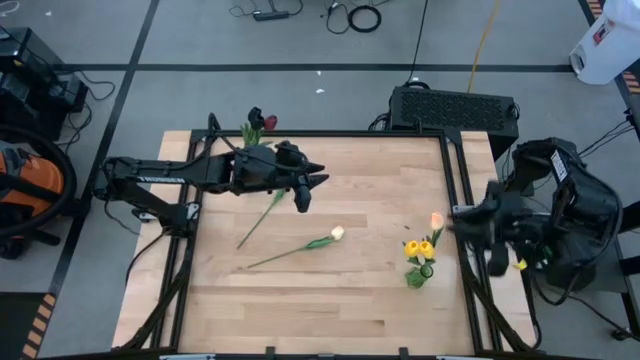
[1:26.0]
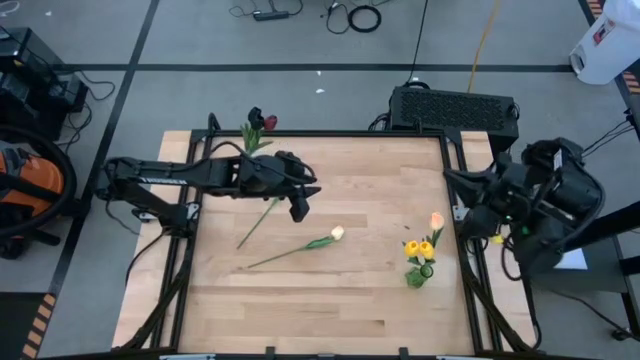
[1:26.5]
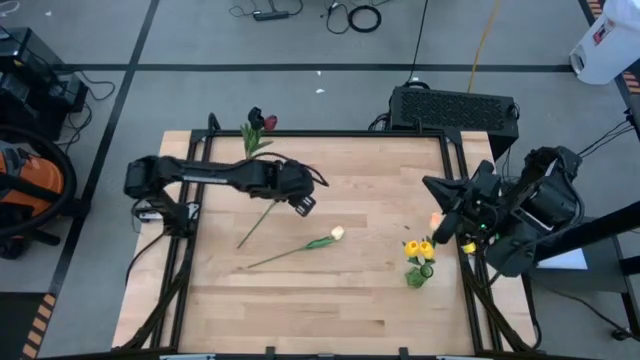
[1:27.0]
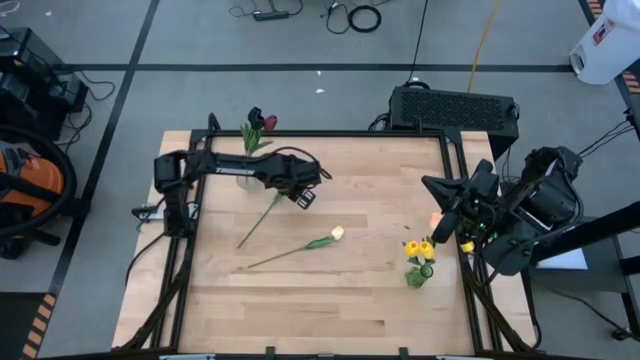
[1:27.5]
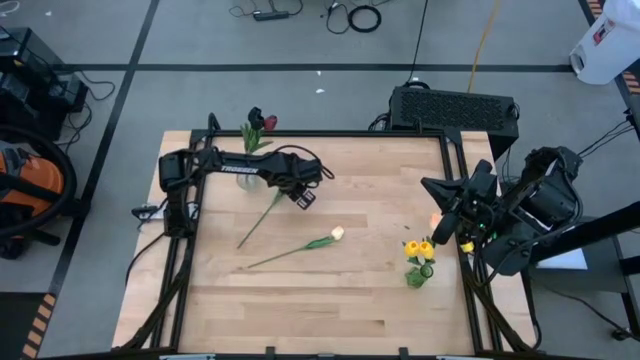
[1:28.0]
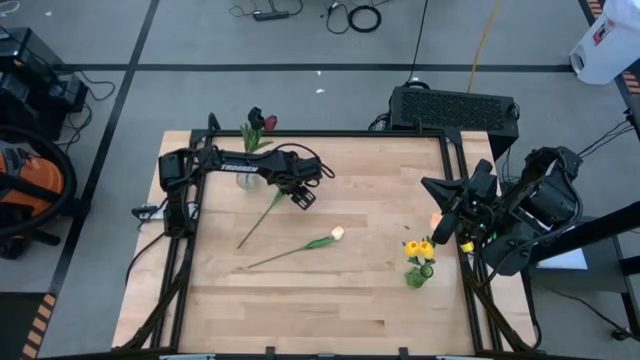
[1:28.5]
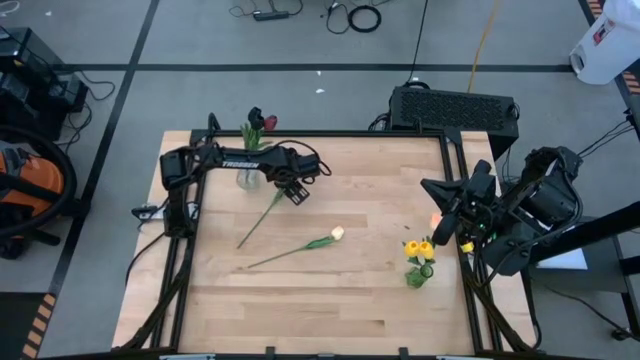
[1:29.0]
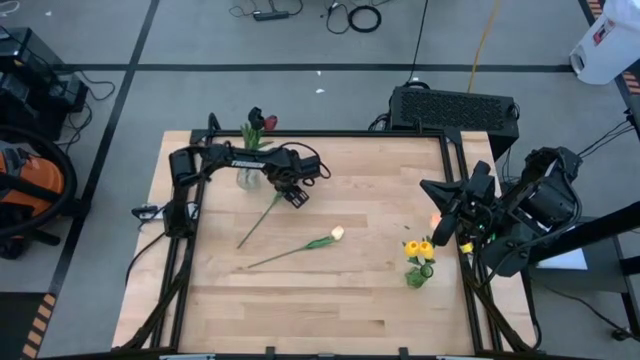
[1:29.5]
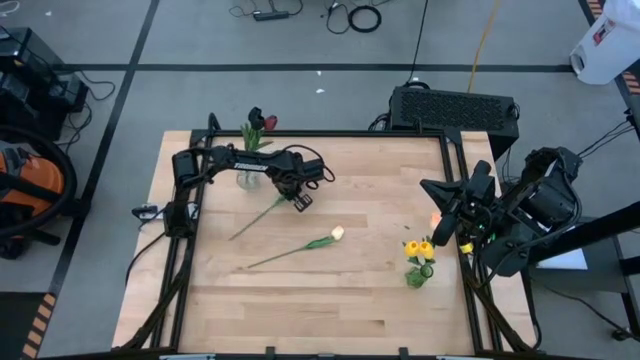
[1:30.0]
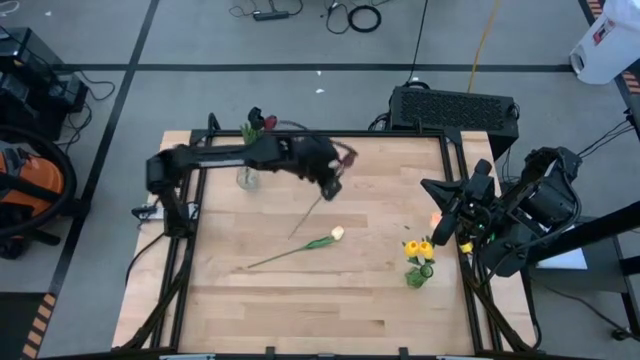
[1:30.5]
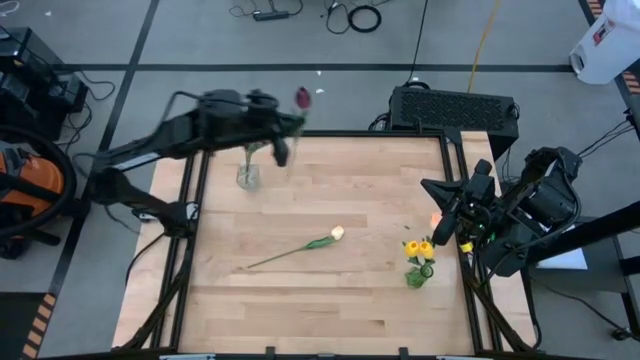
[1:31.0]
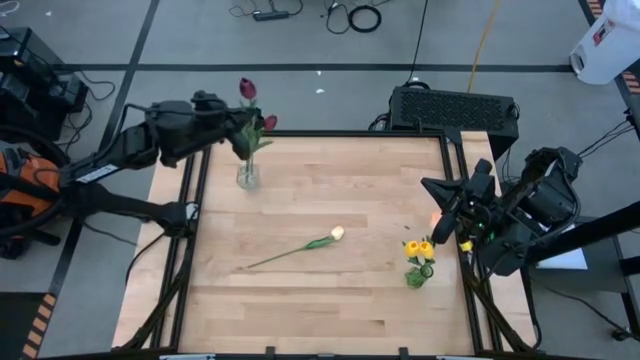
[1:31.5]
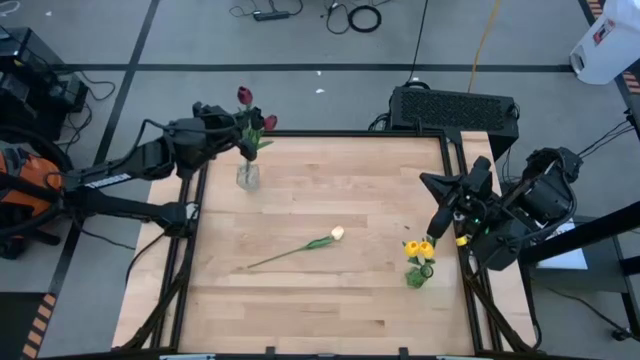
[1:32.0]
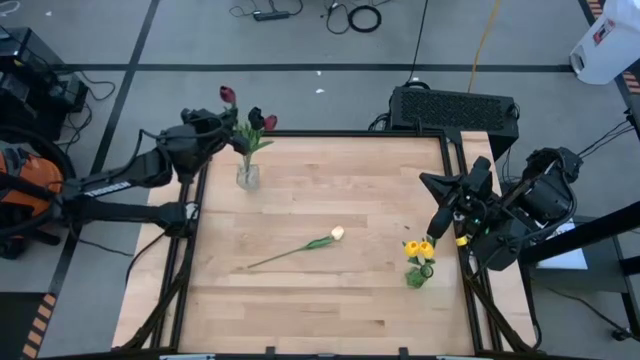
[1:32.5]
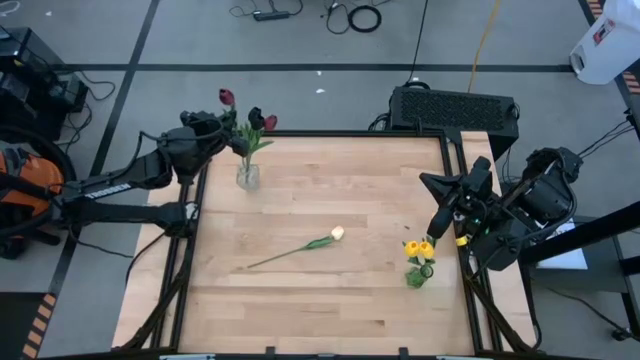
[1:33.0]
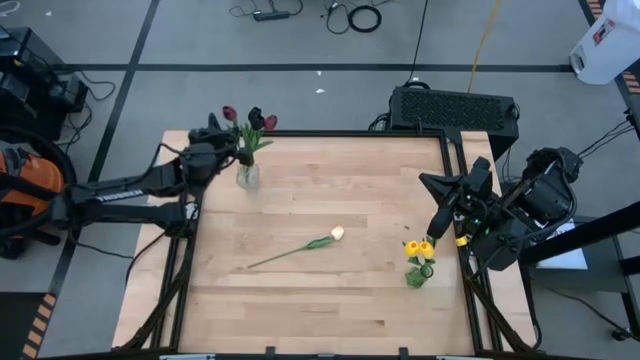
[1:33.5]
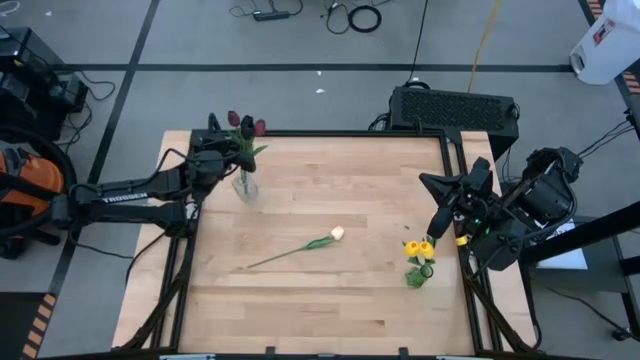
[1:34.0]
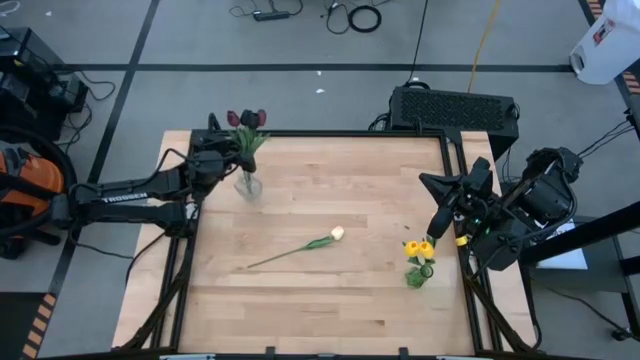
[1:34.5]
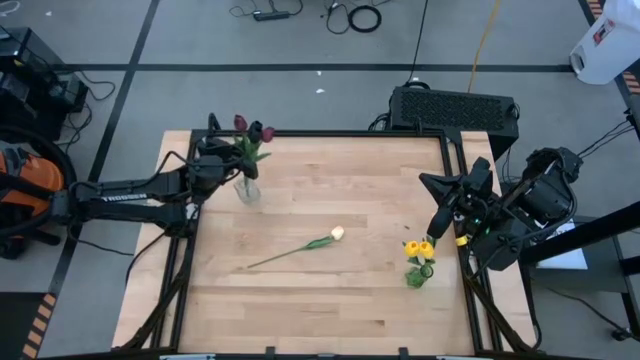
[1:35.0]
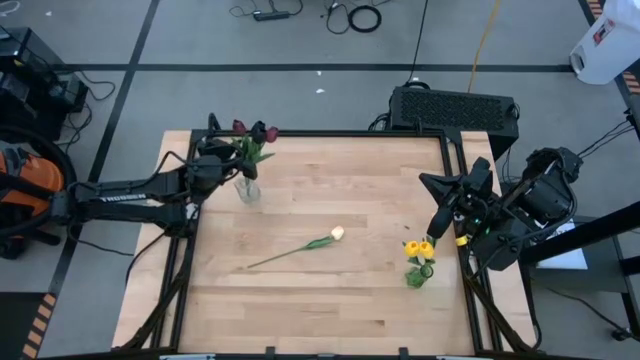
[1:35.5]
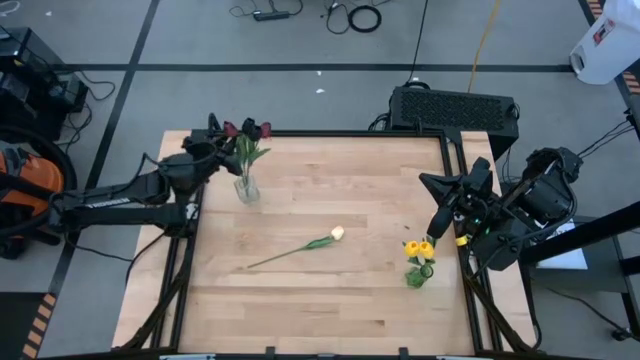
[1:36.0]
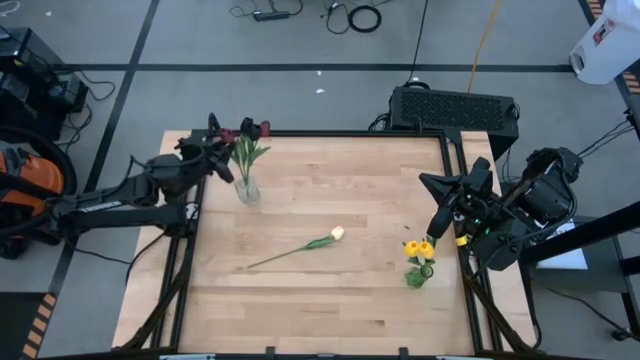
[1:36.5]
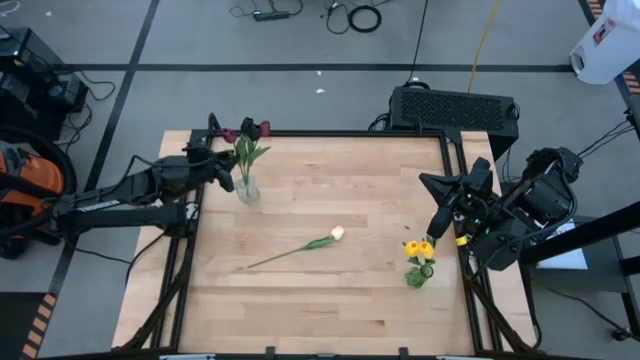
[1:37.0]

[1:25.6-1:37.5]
Task: Sort flowers into vase by color
Put the red flower into the transparent vase

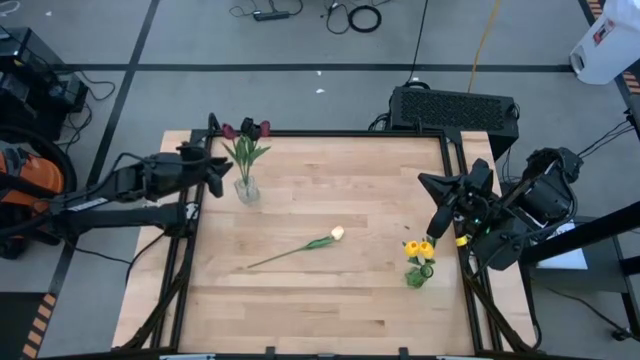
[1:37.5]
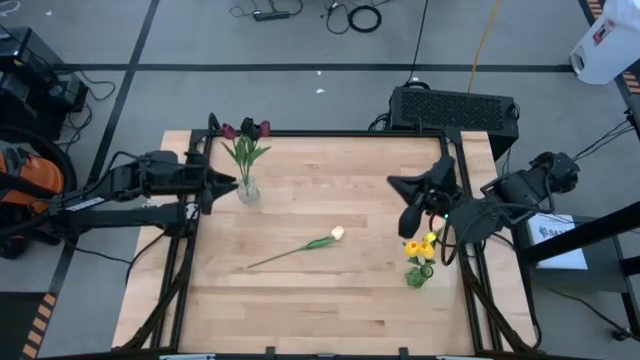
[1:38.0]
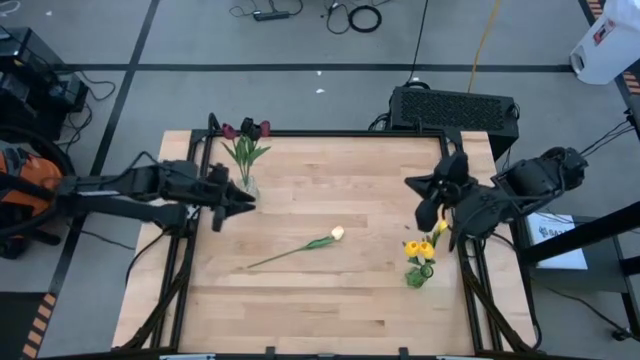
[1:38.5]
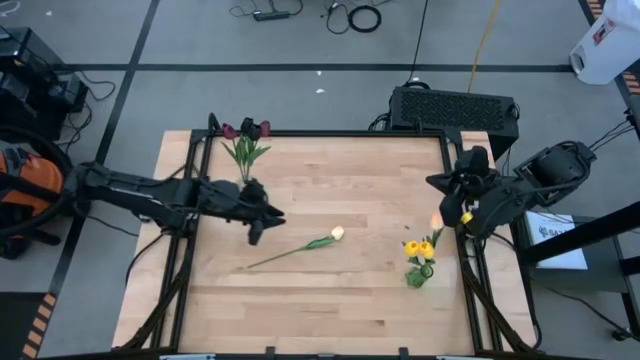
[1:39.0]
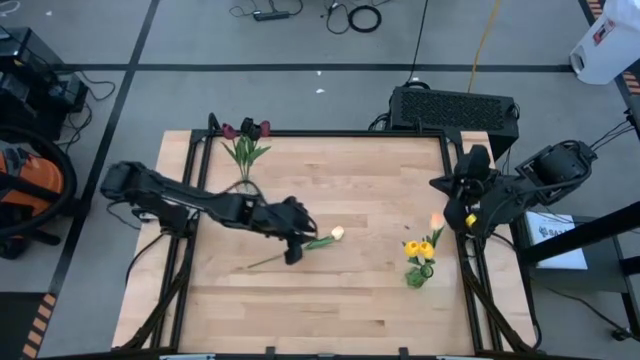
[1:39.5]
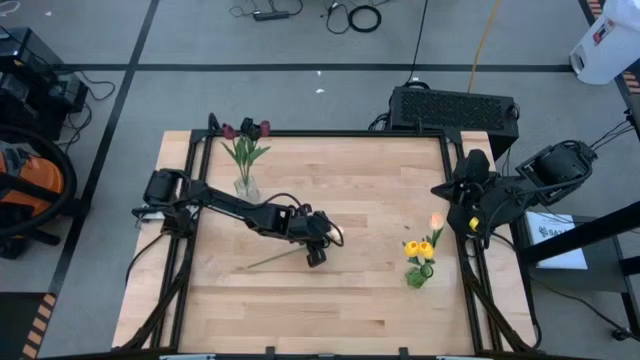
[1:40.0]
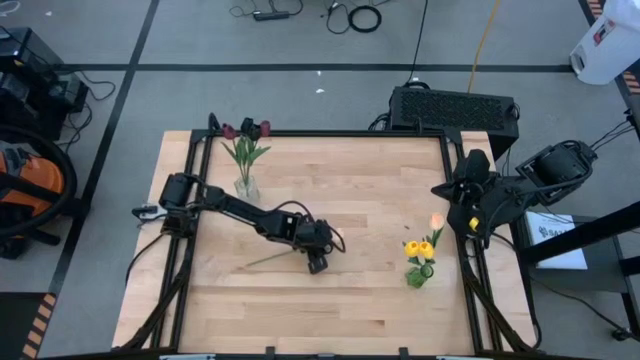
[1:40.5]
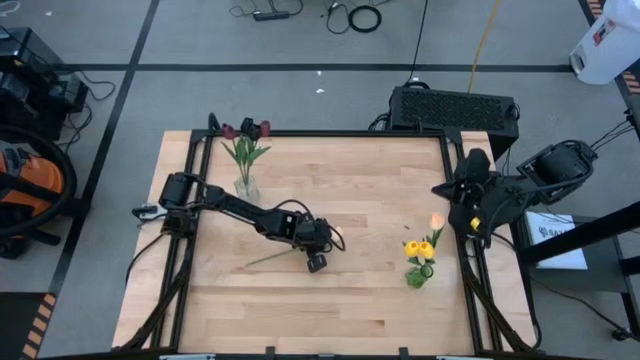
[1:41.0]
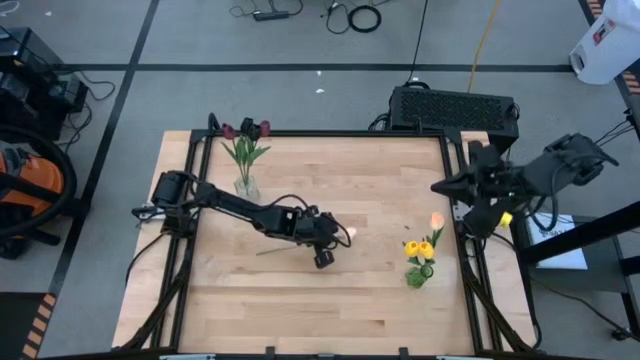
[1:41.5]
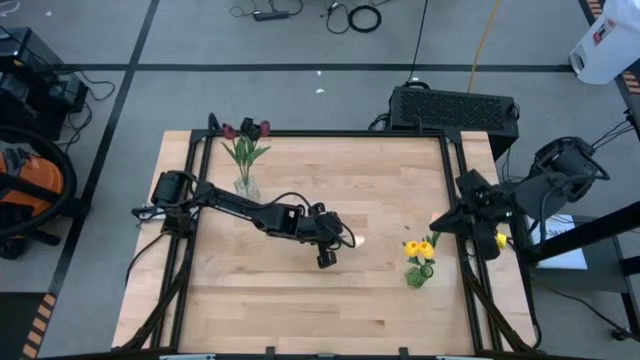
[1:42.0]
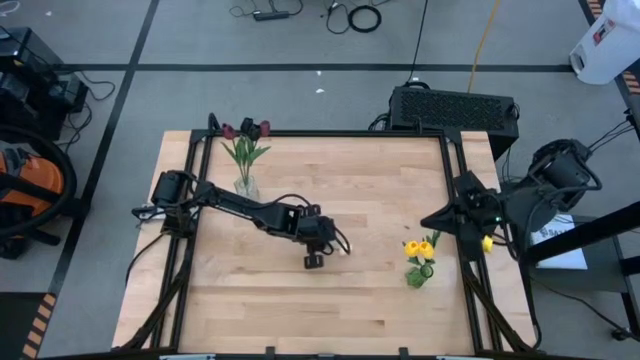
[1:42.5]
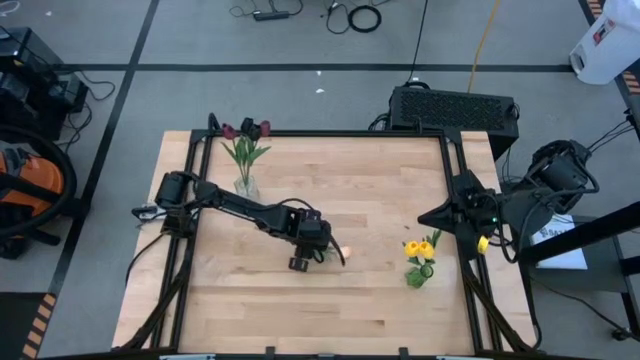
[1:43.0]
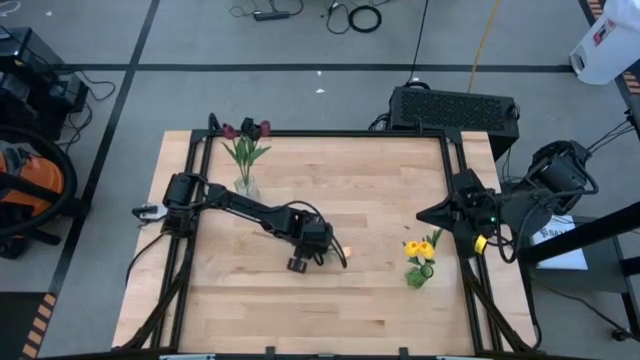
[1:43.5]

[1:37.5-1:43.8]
Put the white flower into the transparent green vase

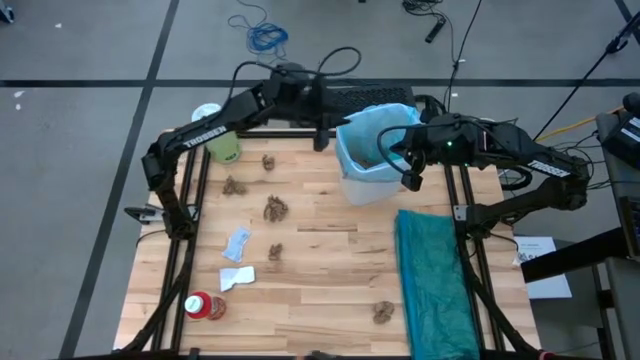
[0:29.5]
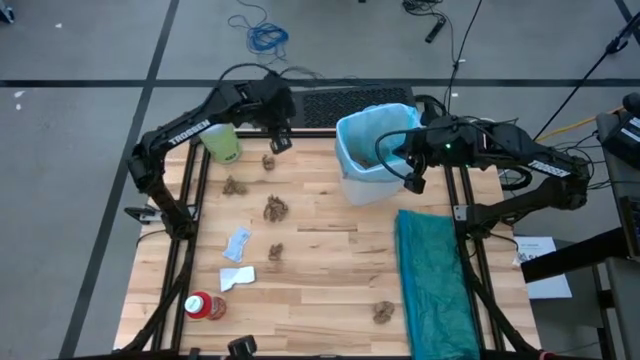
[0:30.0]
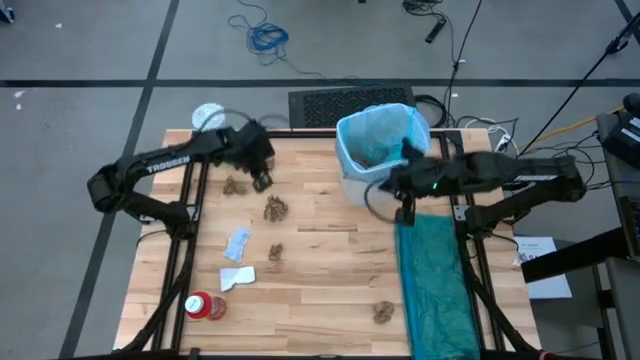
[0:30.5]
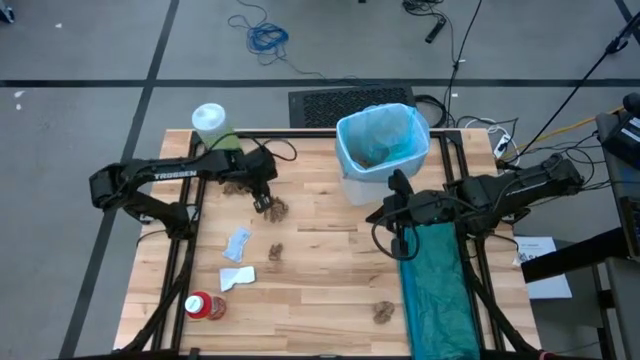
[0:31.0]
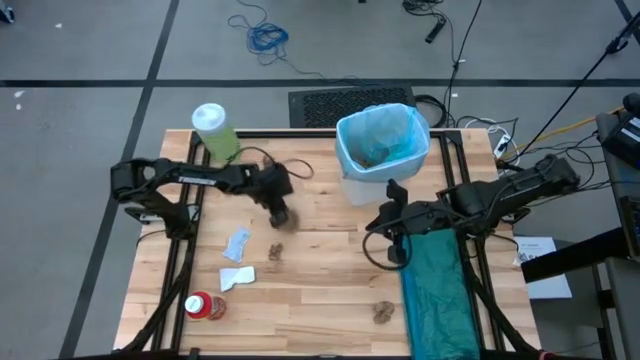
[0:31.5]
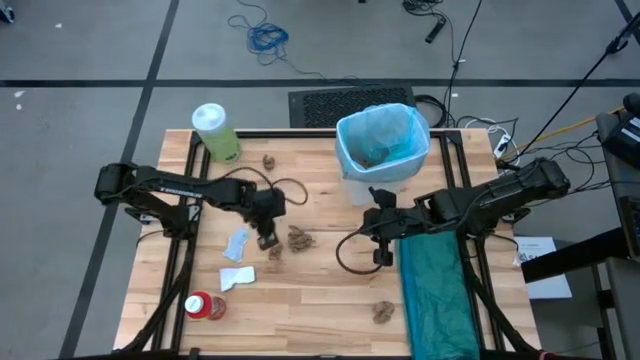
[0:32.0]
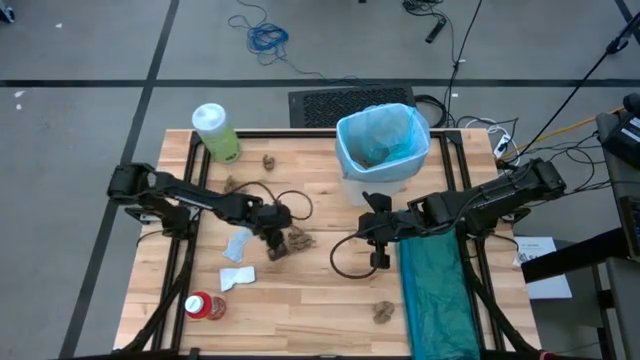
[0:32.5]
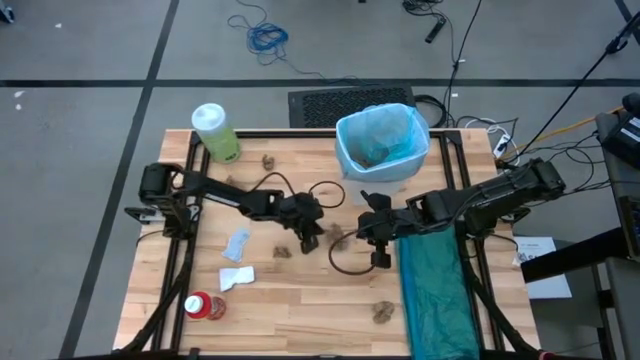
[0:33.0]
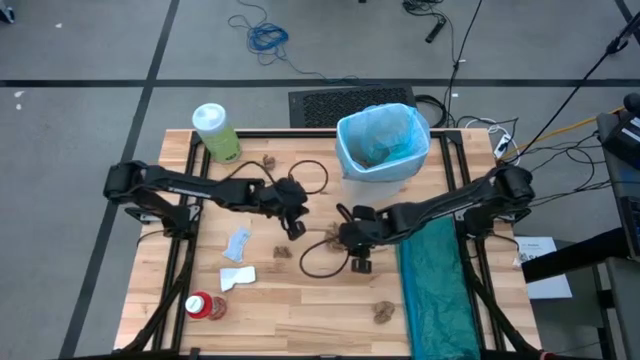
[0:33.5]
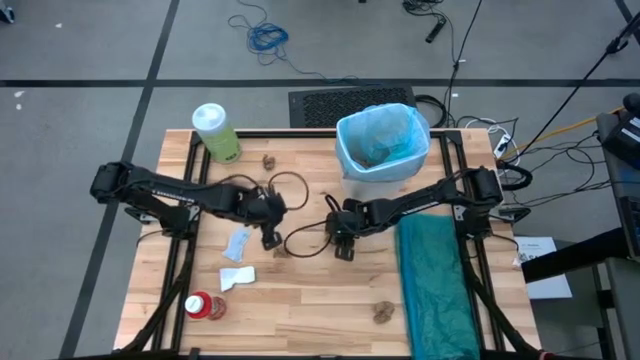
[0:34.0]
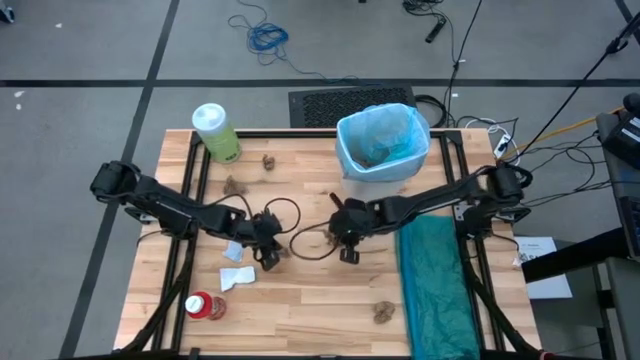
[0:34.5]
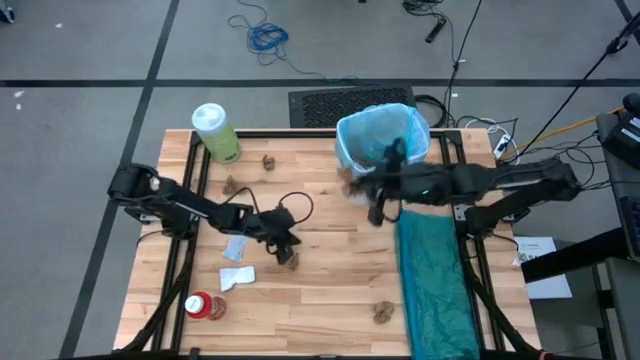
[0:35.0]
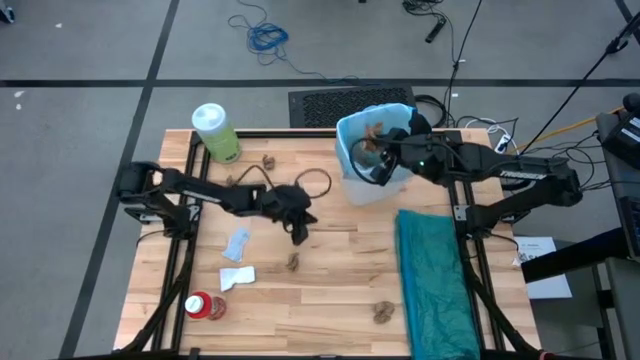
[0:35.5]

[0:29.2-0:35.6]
Task: place trash/remove bag and relplace
Put the brown paper trash into the trash bin
